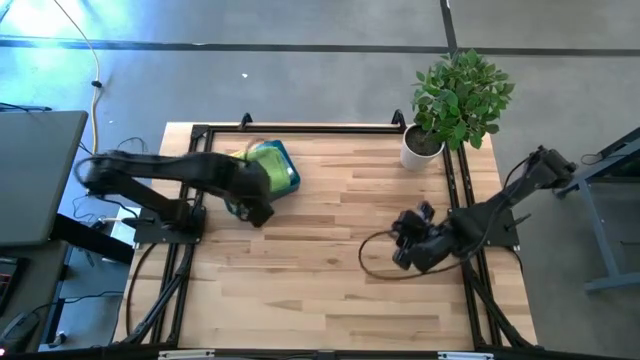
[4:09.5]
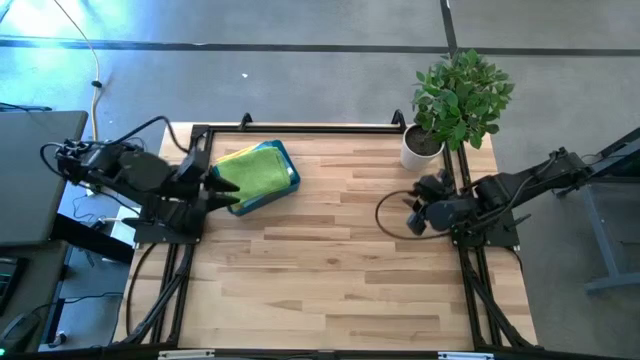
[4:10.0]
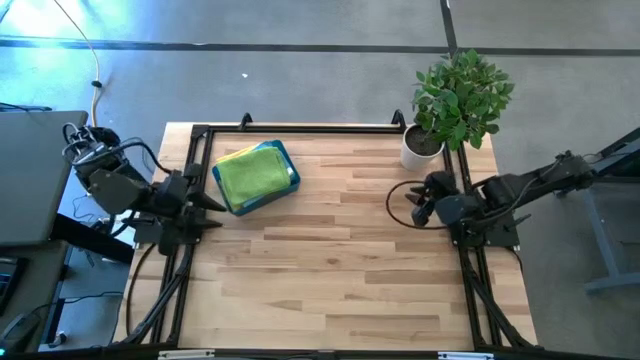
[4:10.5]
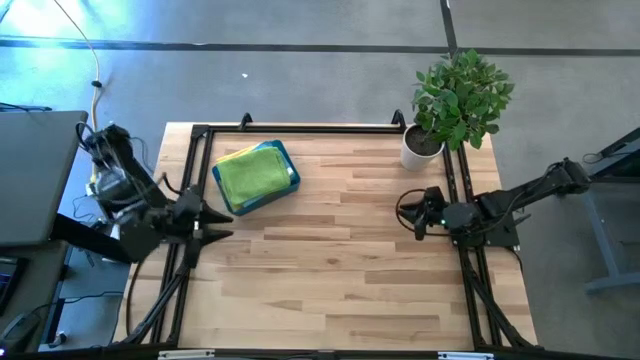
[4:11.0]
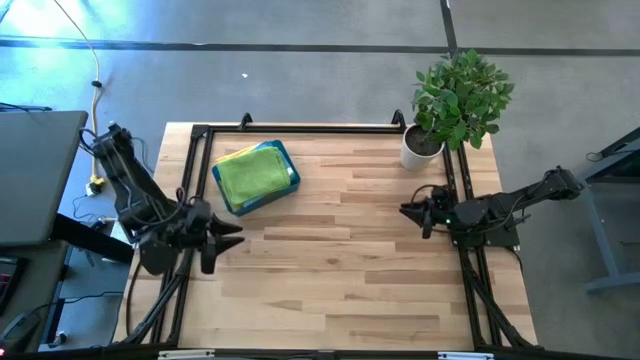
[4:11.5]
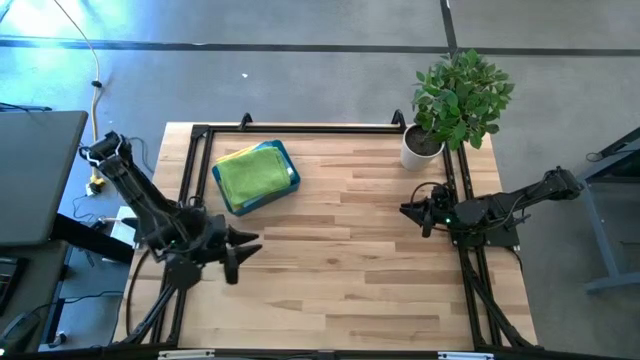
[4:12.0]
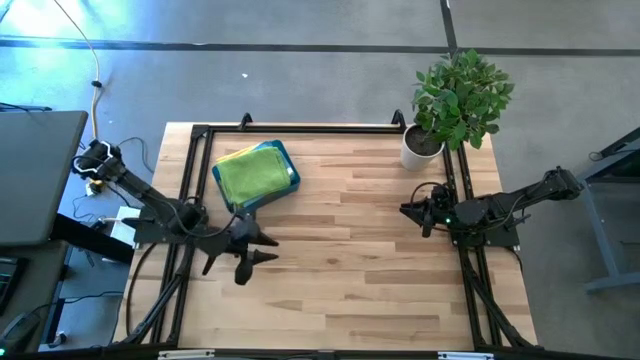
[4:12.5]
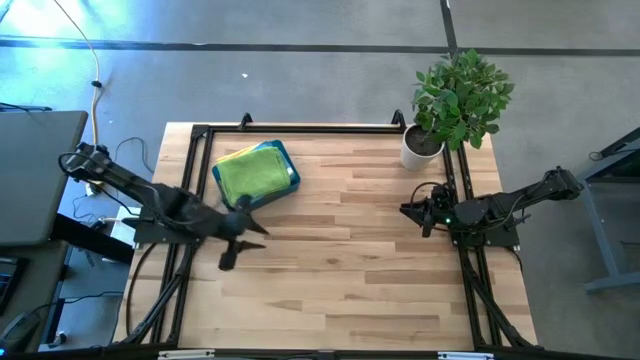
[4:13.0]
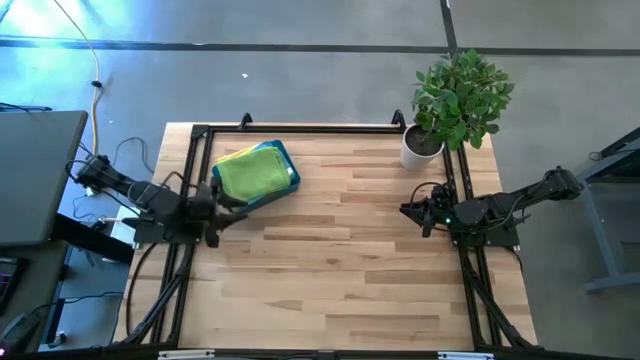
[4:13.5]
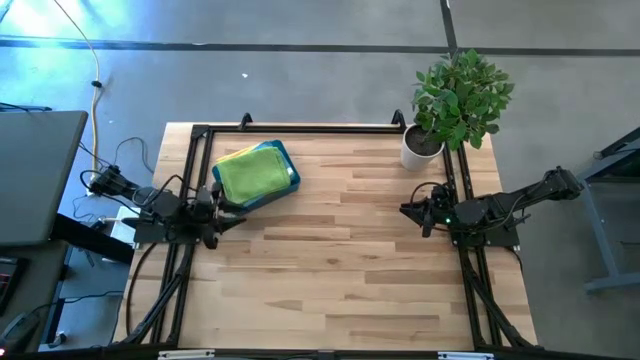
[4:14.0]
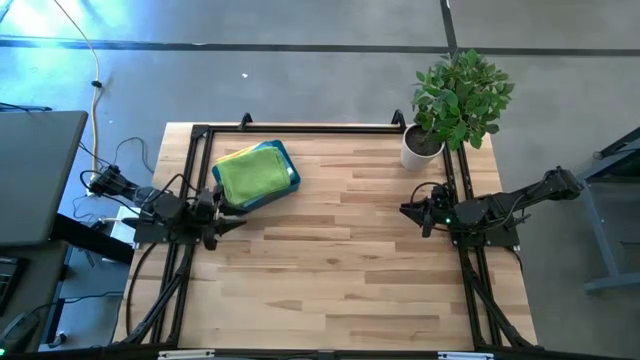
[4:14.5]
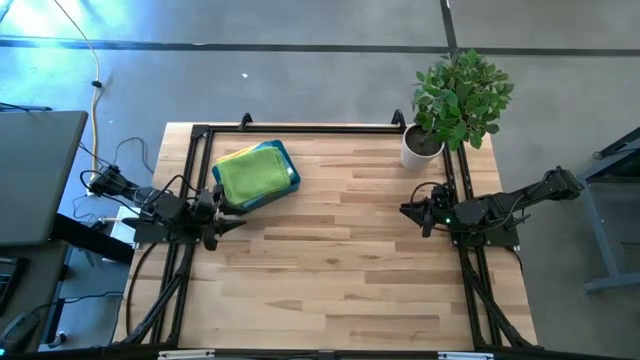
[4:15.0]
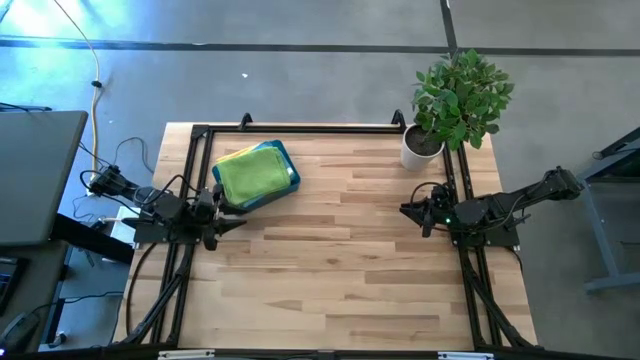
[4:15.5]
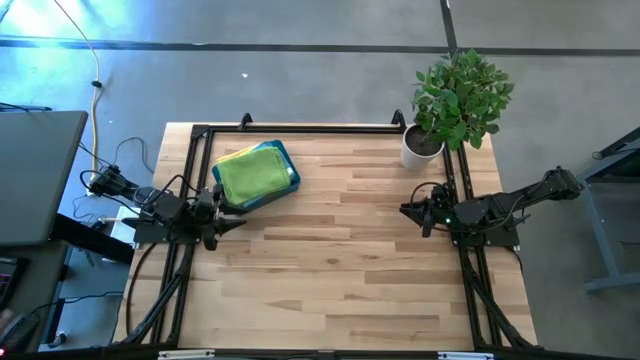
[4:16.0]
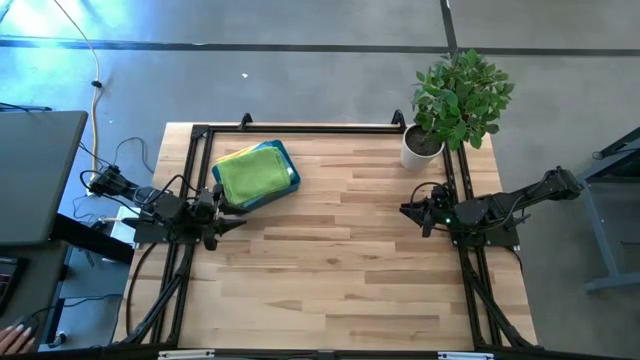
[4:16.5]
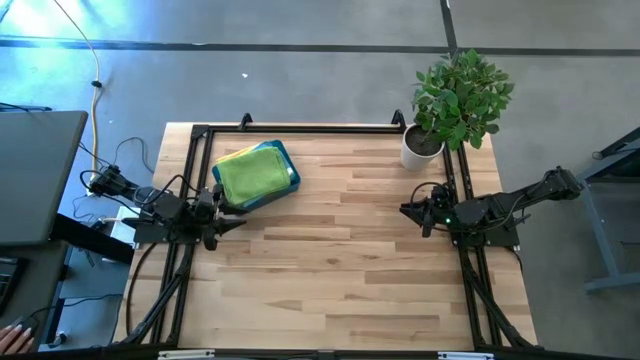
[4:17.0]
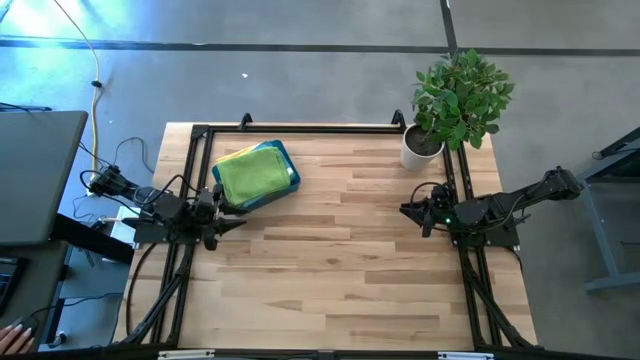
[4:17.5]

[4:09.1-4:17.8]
Task: Fold microfiber towels
Return to Home Position

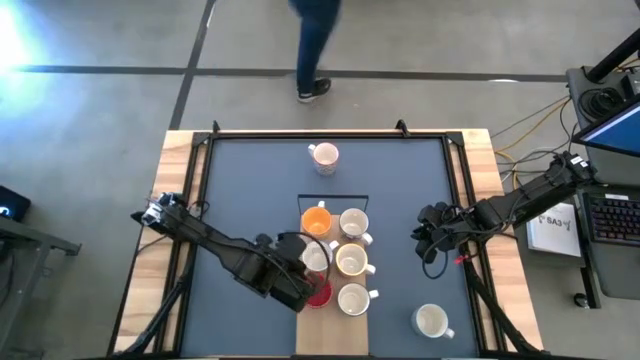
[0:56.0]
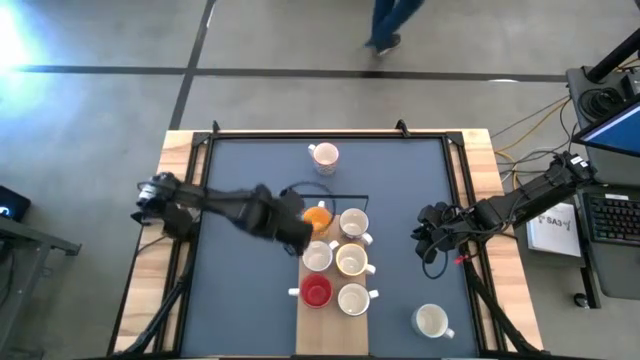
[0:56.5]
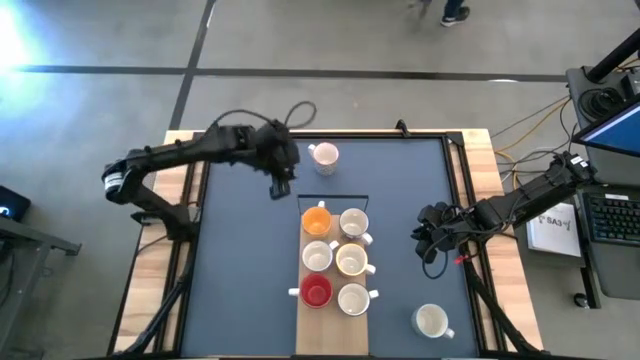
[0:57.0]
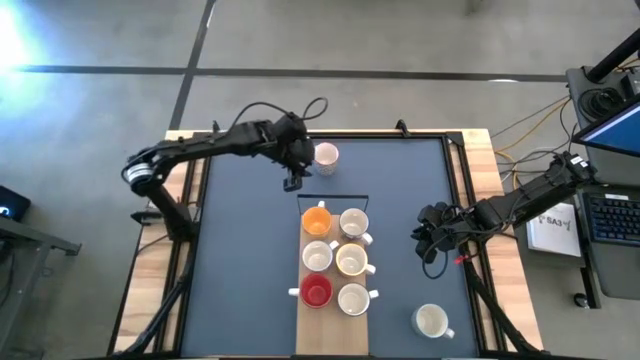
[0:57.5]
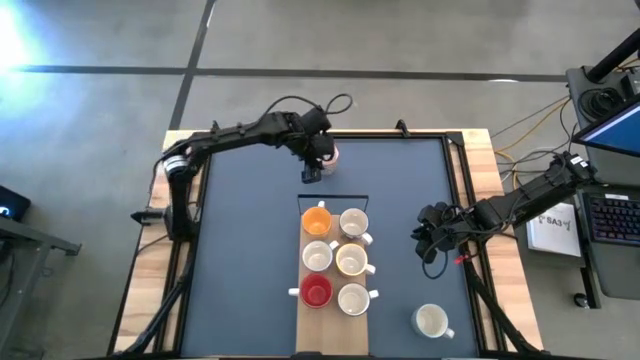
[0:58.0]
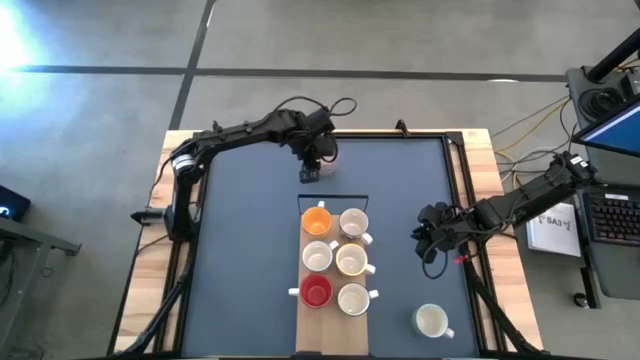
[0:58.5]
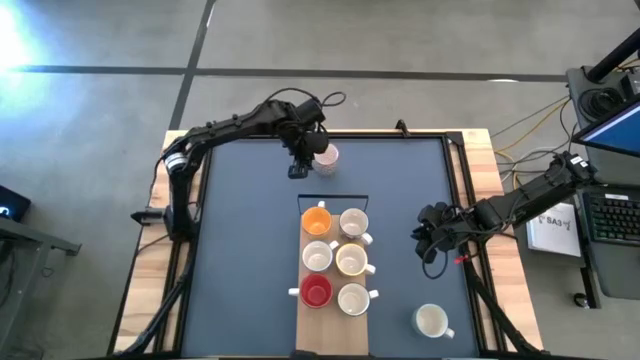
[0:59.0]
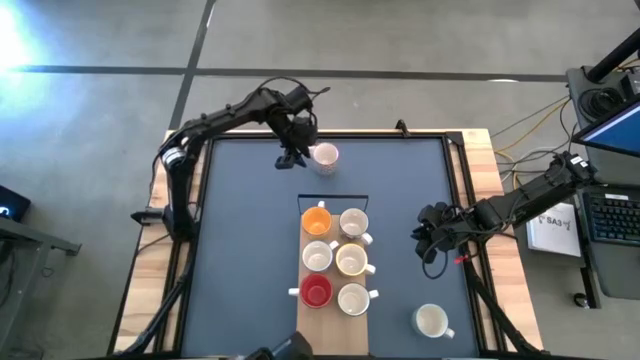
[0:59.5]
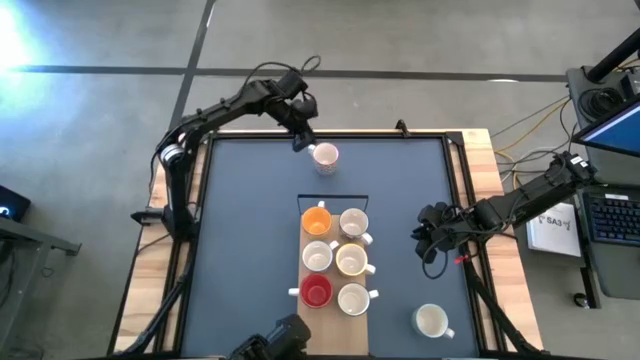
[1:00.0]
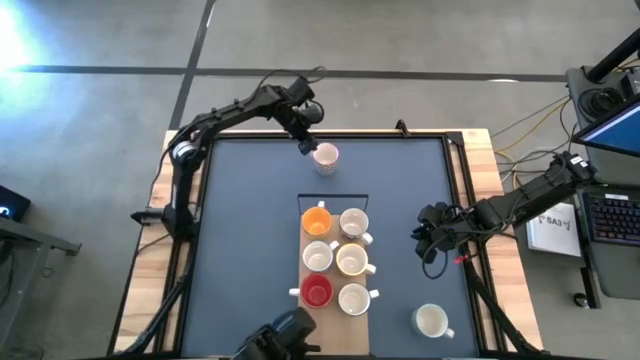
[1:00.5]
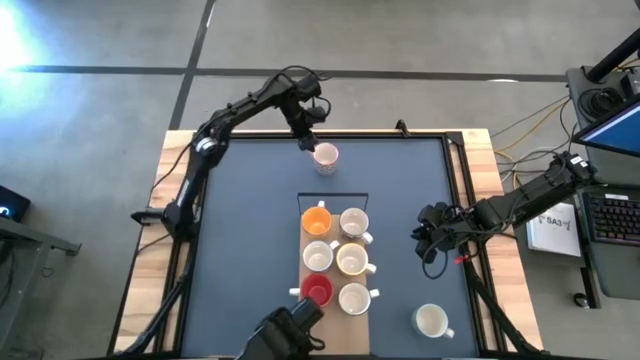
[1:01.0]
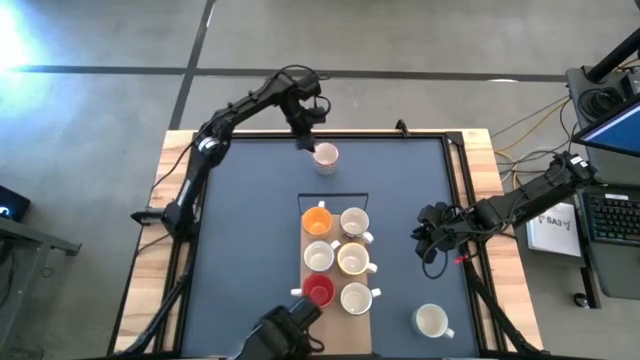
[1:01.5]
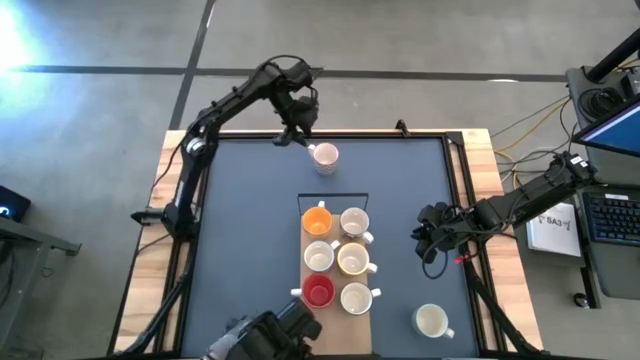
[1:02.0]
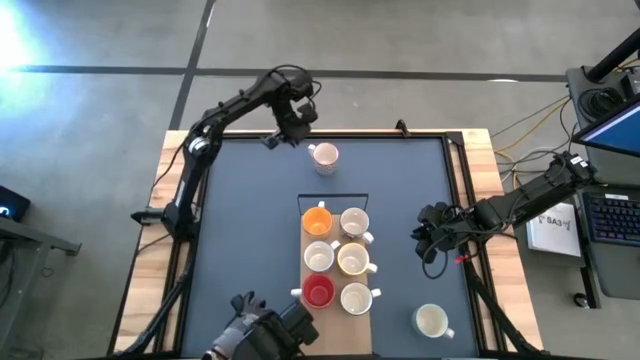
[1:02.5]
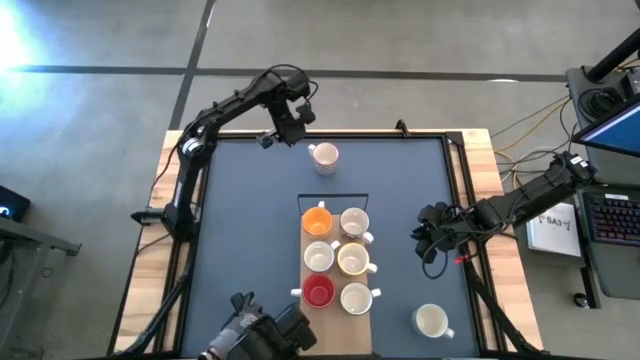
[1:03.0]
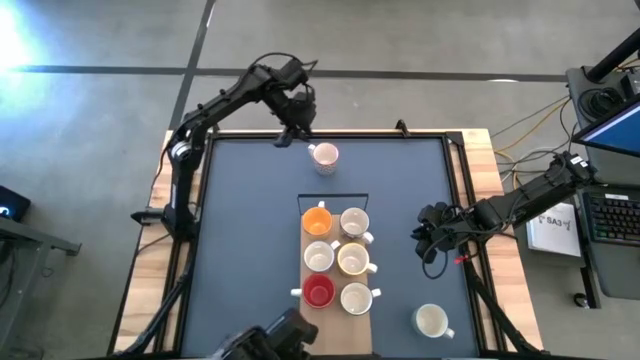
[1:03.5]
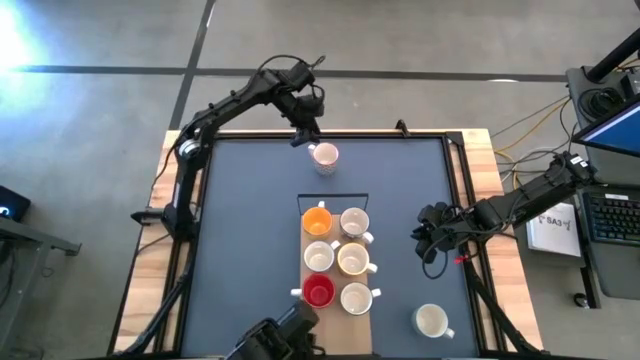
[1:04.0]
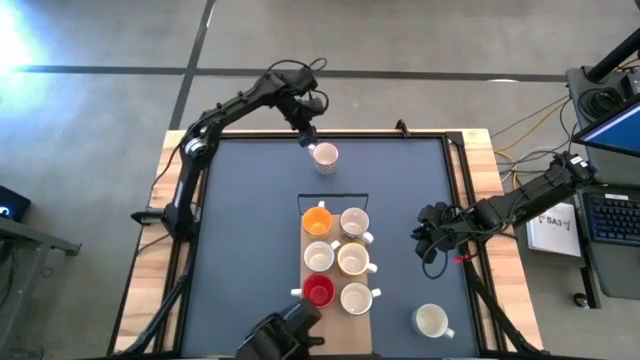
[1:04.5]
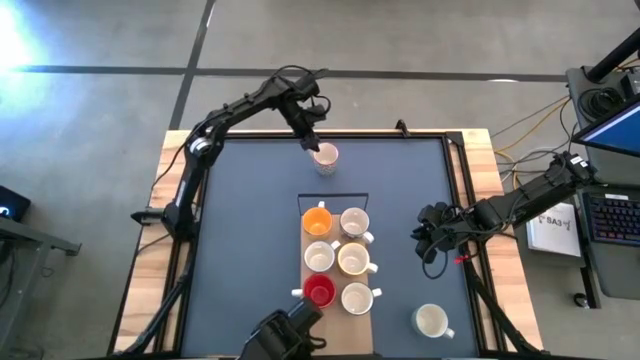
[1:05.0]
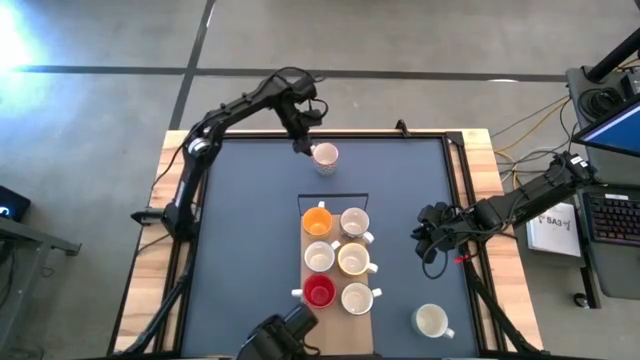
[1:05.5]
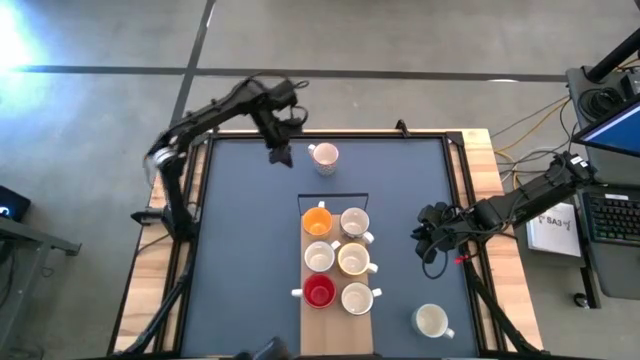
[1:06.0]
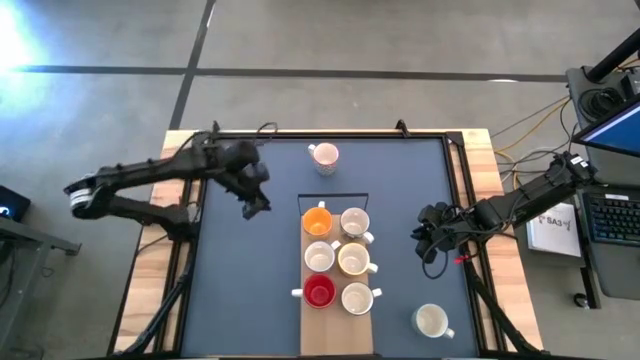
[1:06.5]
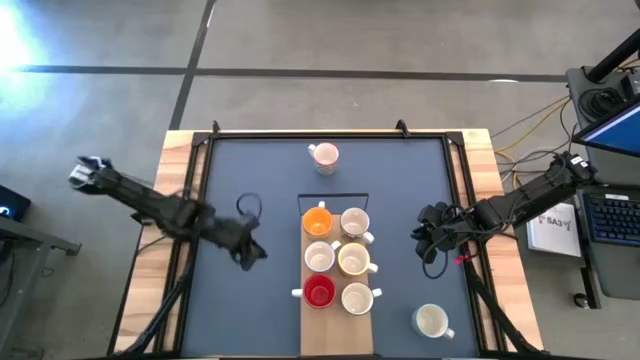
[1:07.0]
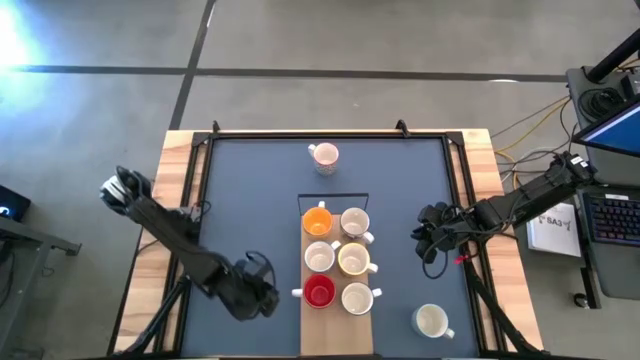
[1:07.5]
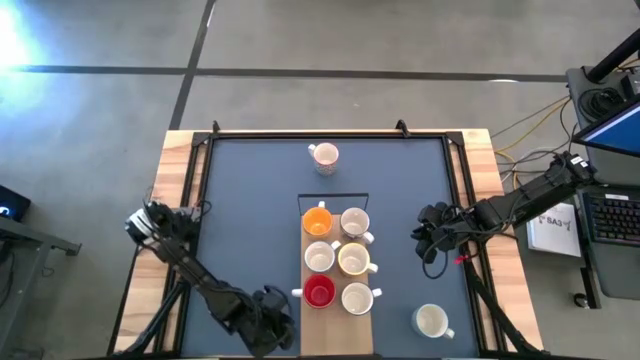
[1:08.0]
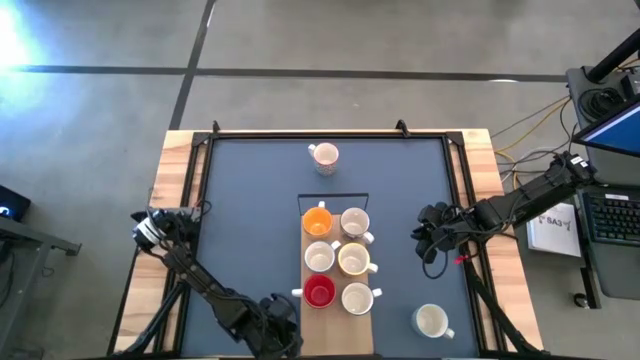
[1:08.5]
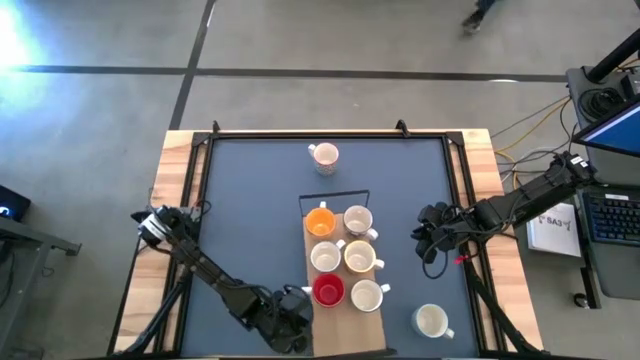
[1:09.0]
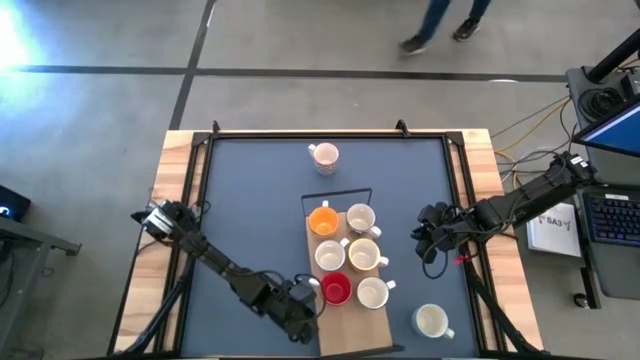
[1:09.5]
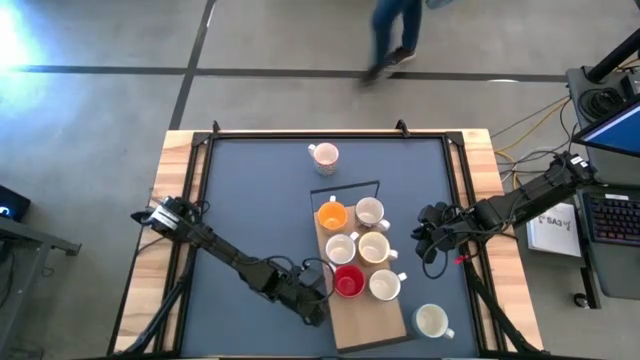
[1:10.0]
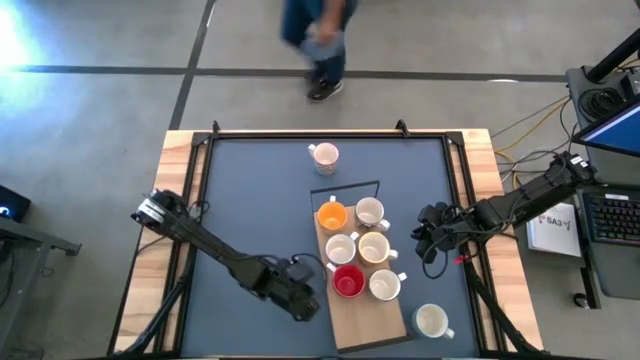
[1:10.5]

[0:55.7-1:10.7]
Task: Place coffee mugs
Adjust the shelf
